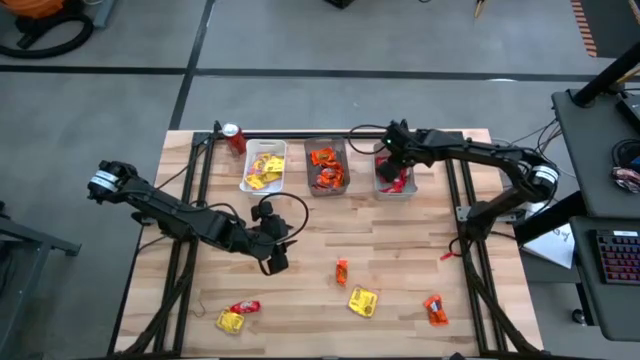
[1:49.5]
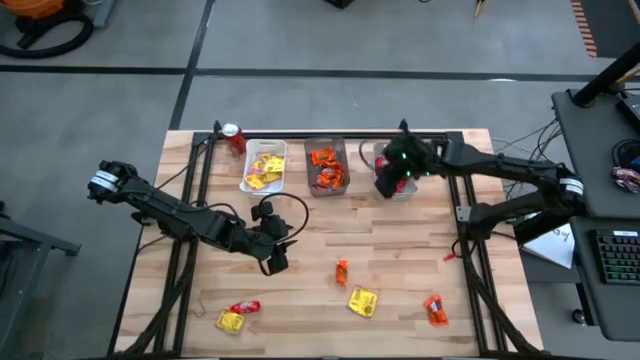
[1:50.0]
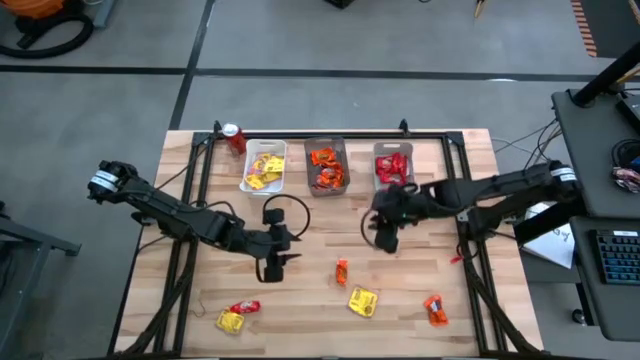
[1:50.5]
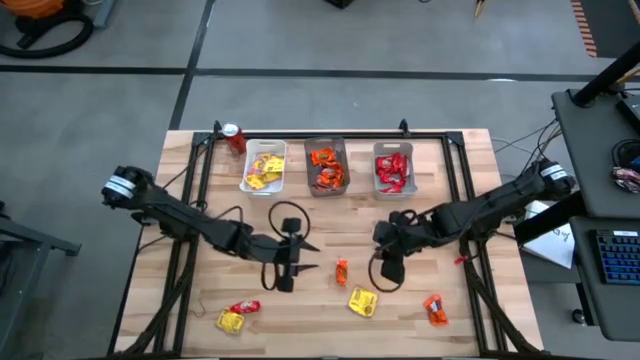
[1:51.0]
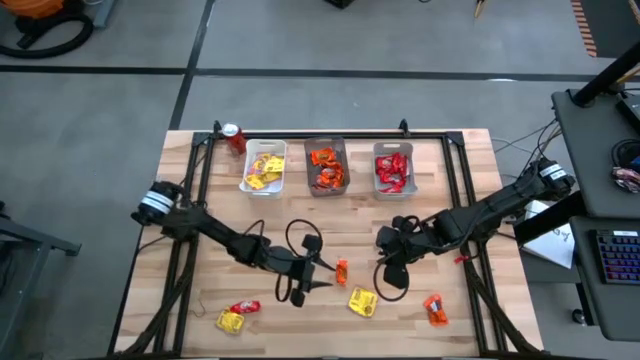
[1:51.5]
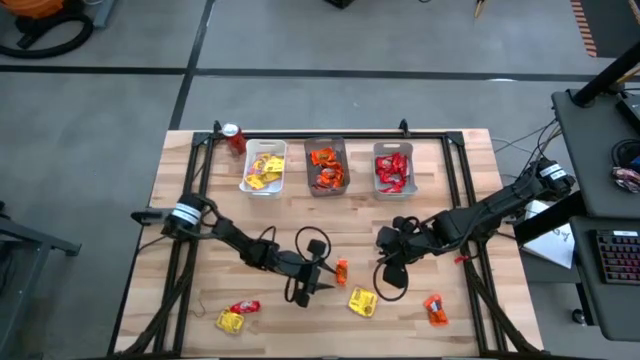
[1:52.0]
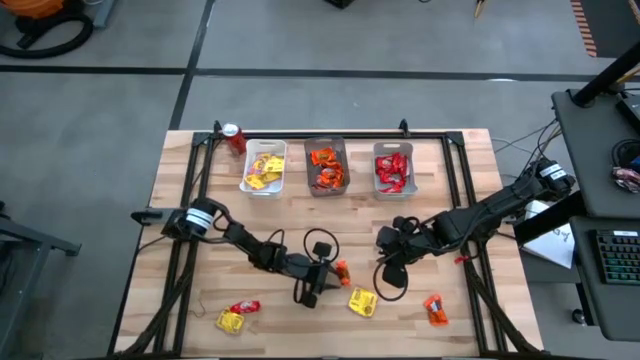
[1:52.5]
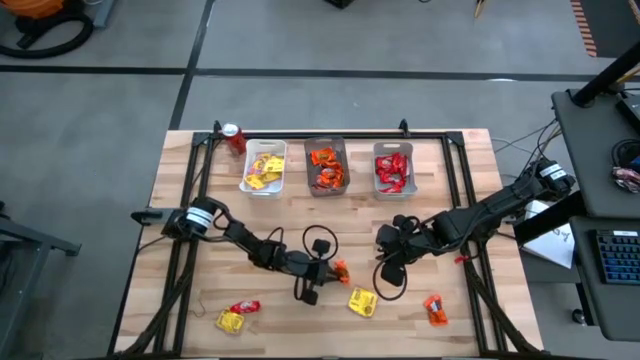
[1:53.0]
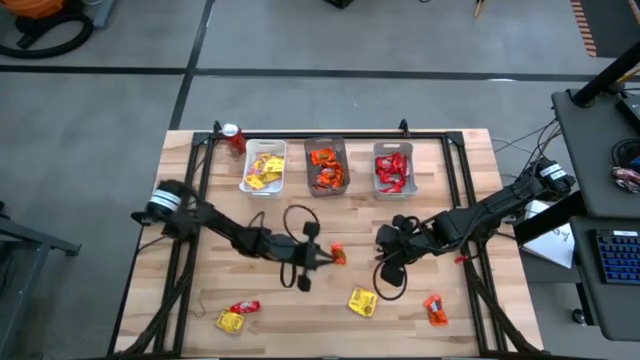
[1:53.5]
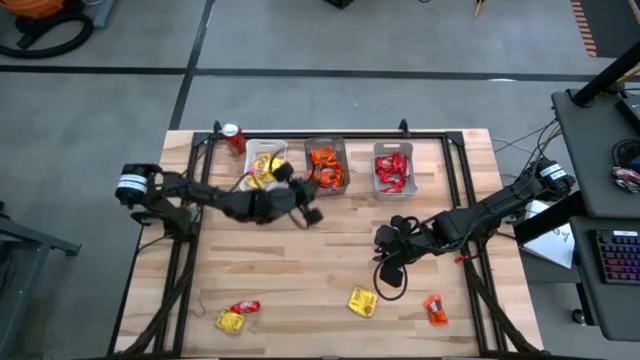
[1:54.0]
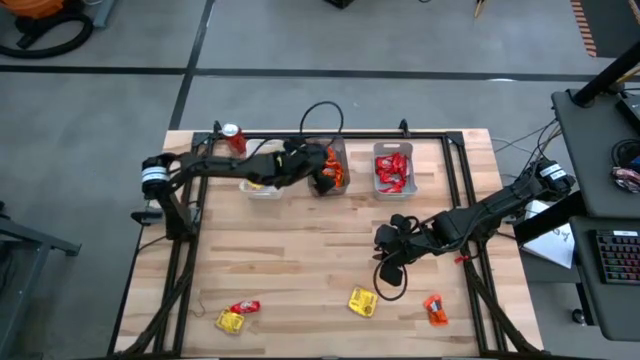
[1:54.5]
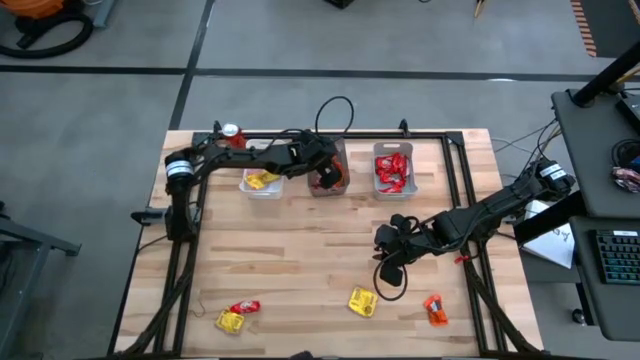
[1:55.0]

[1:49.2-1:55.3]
Task: Sort candy
Put the orange chocolate into the black bin

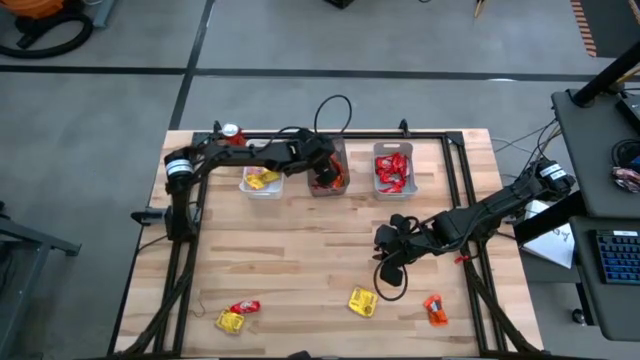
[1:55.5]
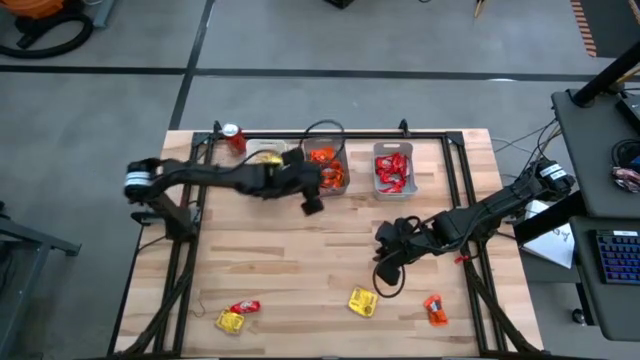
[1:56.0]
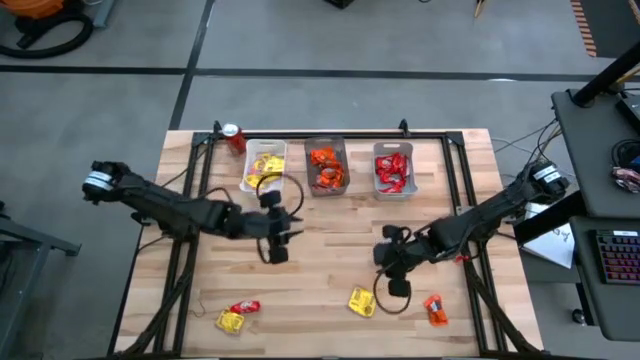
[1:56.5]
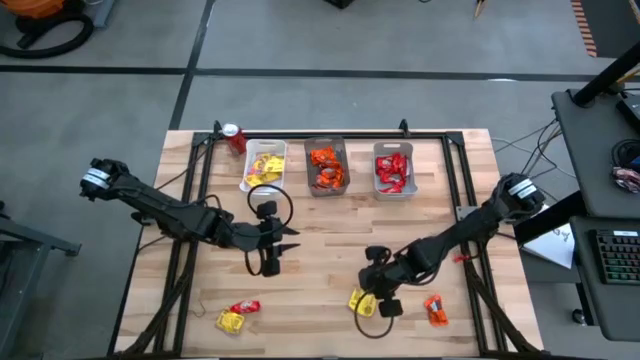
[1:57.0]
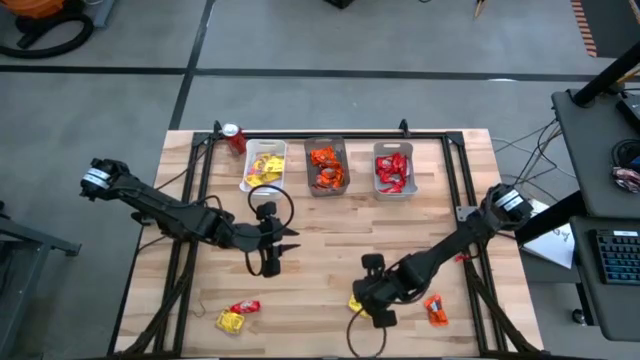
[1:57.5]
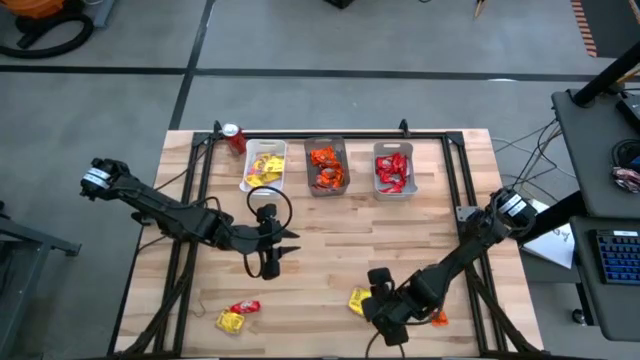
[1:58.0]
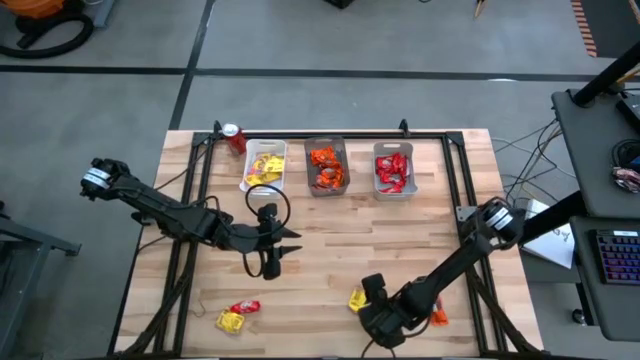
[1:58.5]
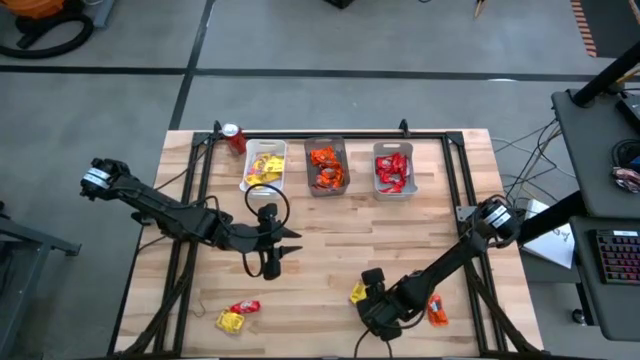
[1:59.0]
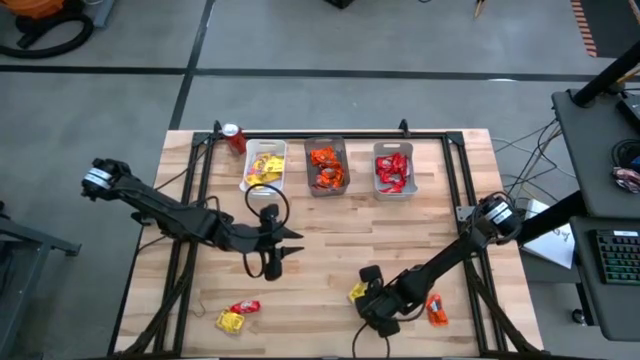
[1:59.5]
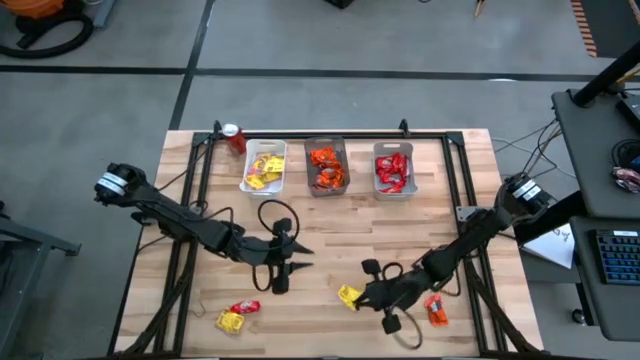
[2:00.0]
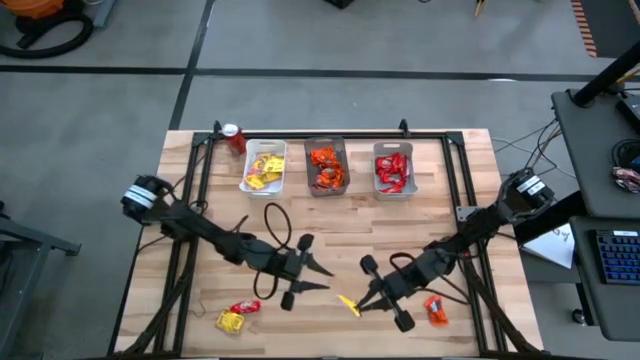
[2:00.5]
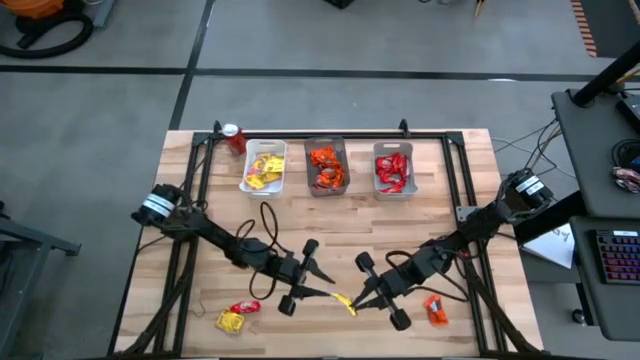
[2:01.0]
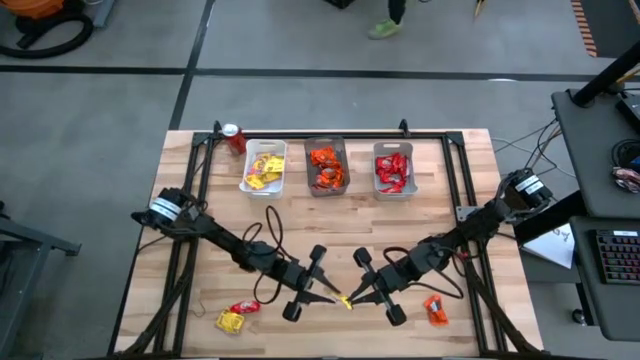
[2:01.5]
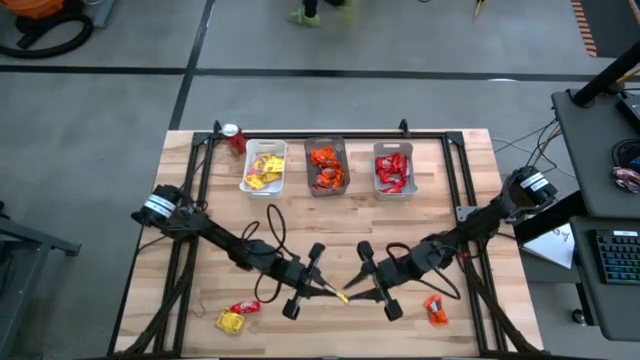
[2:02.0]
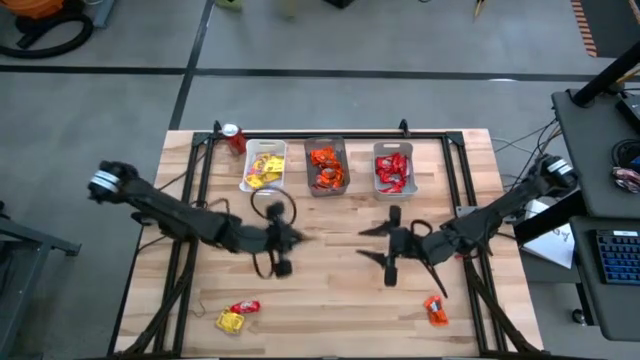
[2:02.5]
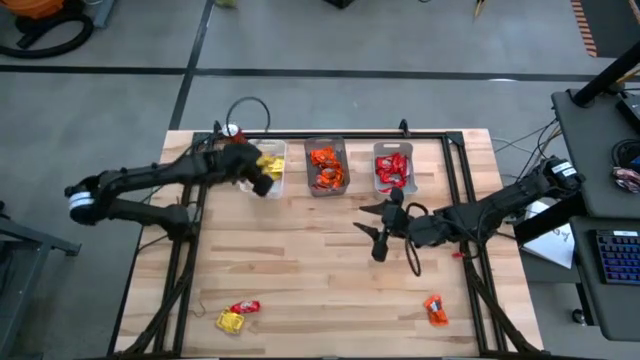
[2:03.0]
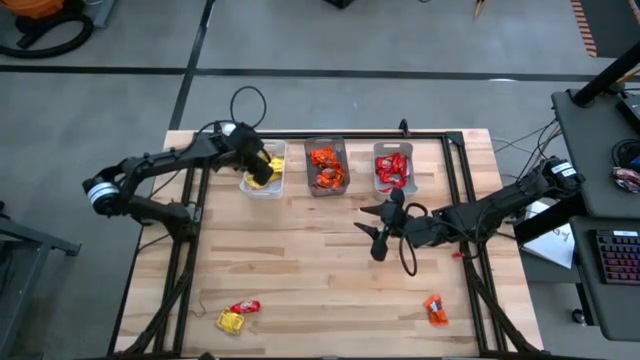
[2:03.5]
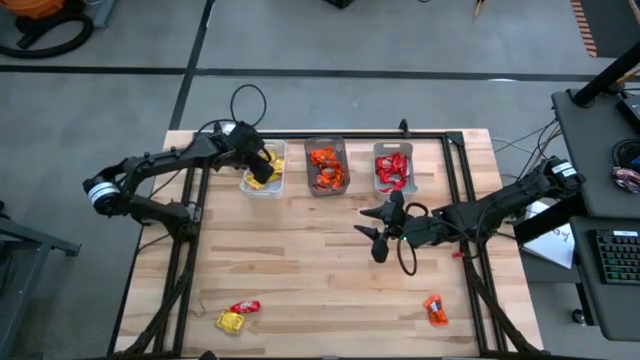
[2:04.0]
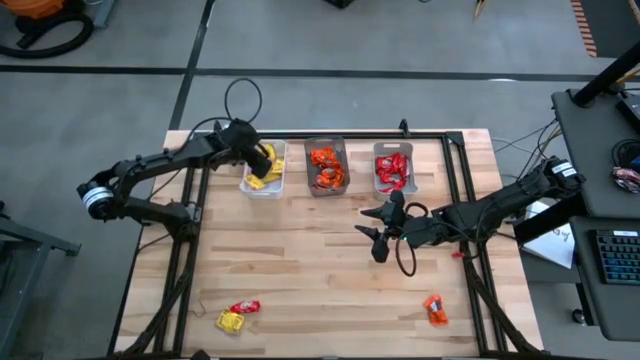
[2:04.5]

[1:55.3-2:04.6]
Put the yellow candy into the white bin

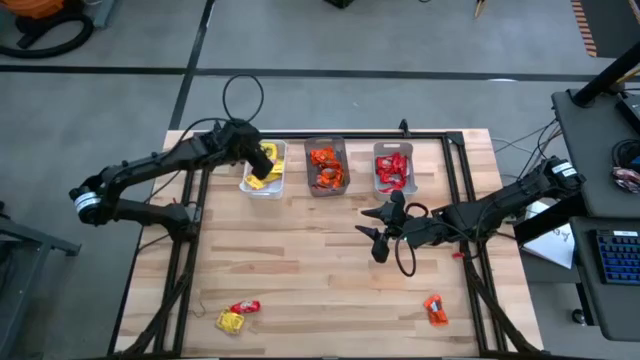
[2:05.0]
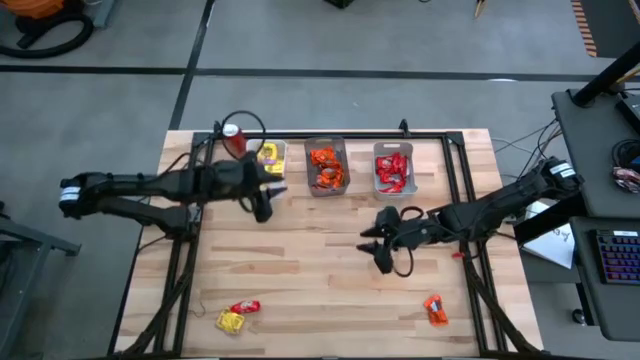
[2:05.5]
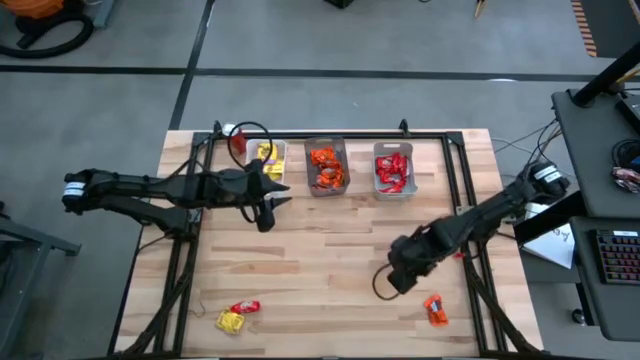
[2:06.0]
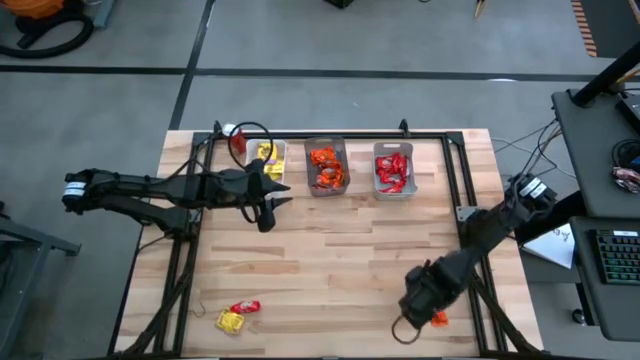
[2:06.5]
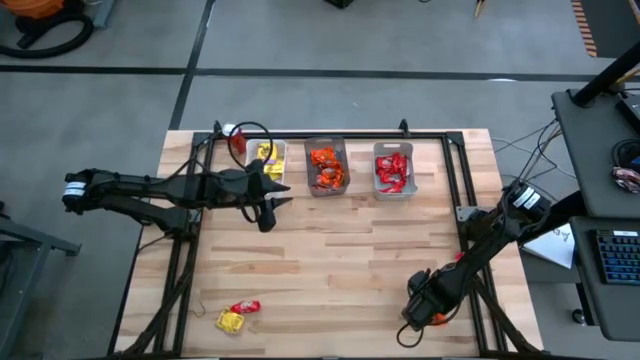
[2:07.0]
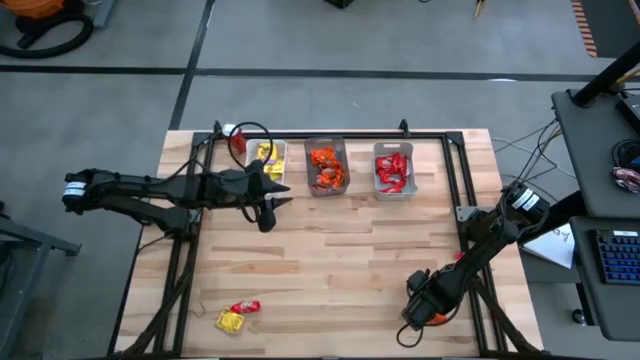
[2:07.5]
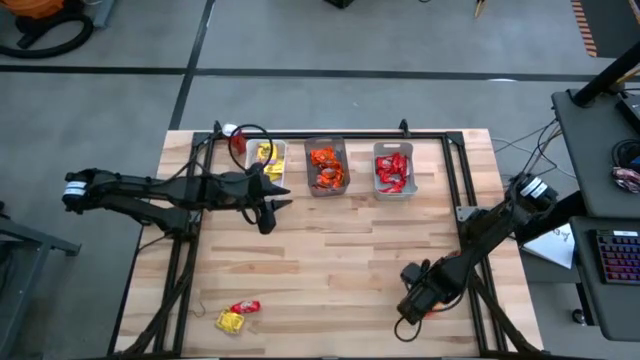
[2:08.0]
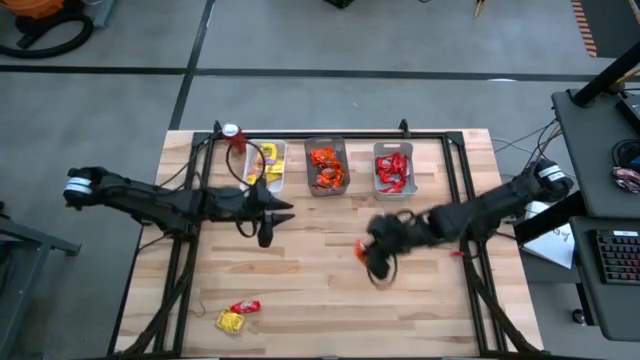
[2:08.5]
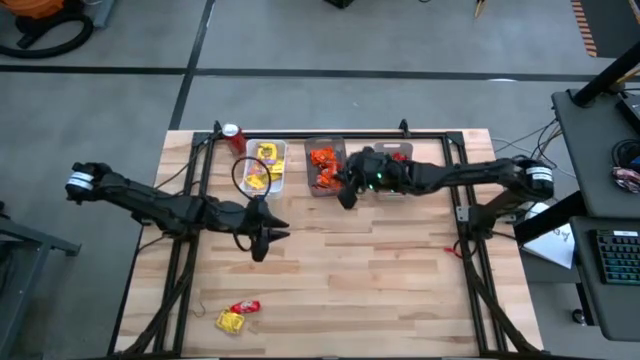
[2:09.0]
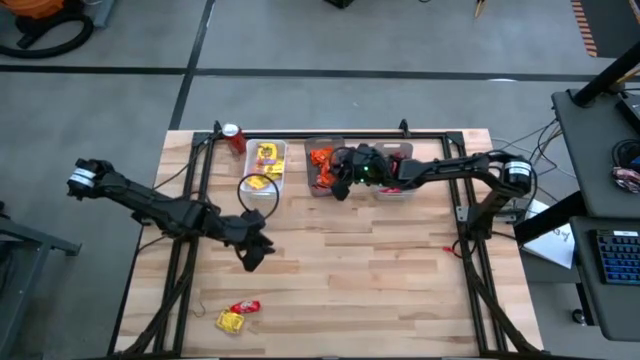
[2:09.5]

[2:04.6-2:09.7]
Put the orange chocolate into the black bin

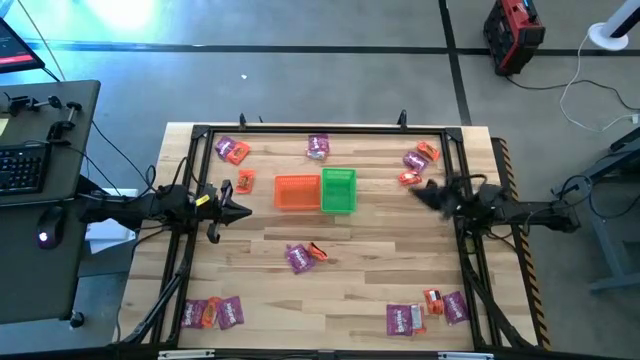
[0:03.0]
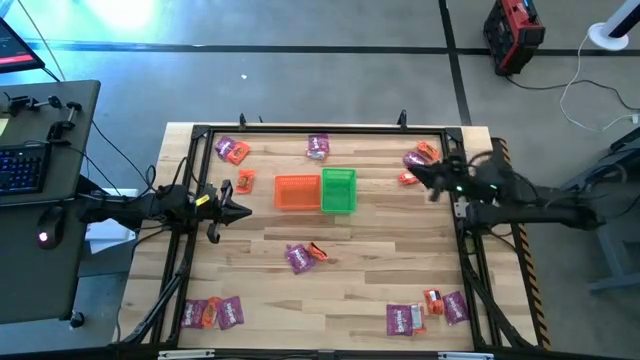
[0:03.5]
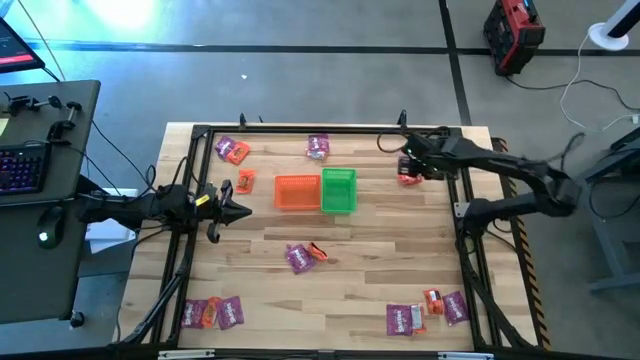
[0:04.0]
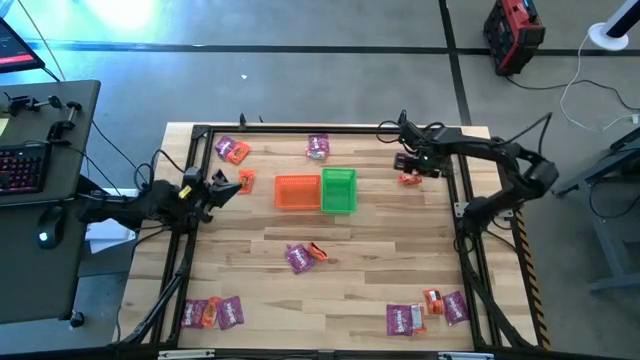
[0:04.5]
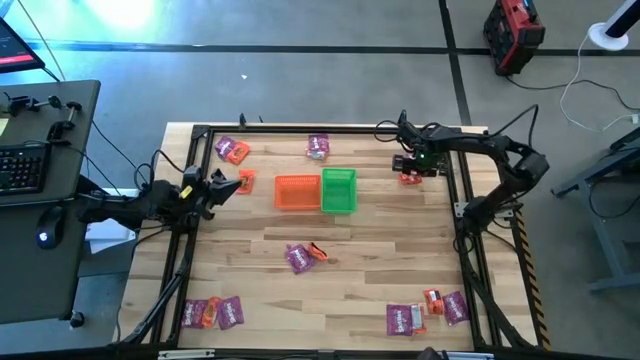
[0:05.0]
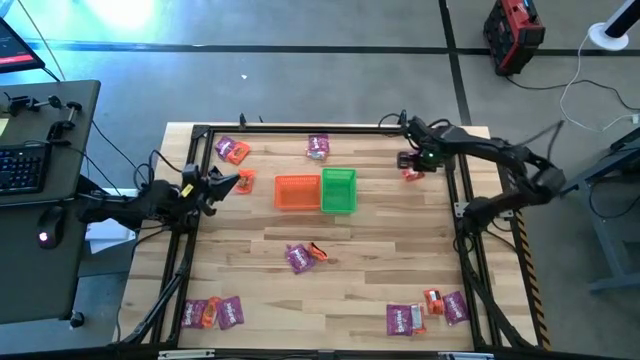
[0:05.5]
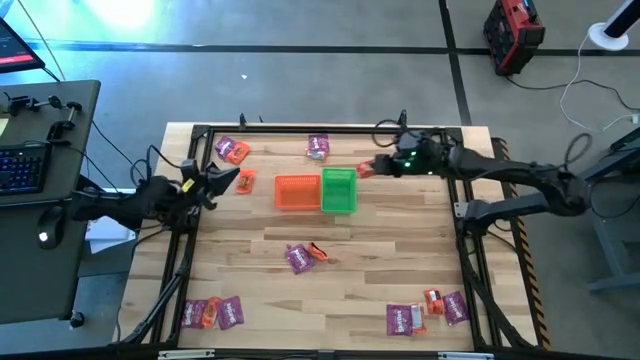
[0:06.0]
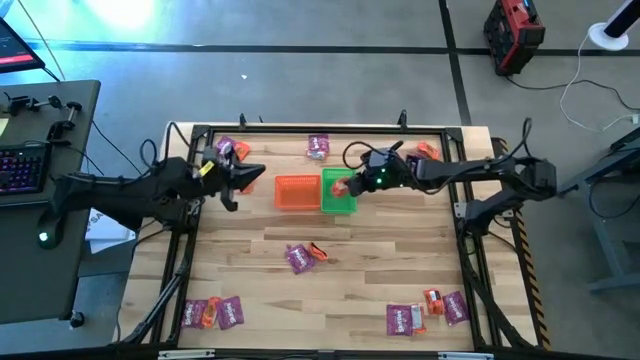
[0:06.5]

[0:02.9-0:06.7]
Task: Sort candy by brand, put in halloween buckets
Put the orange chocolate into the green bin
